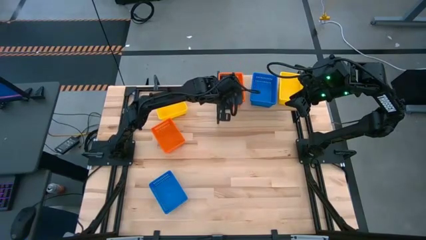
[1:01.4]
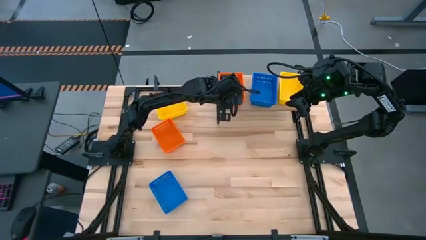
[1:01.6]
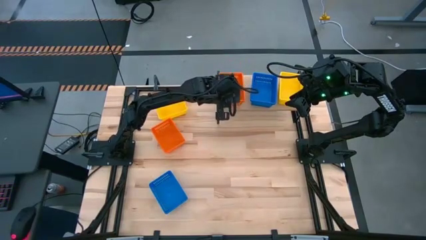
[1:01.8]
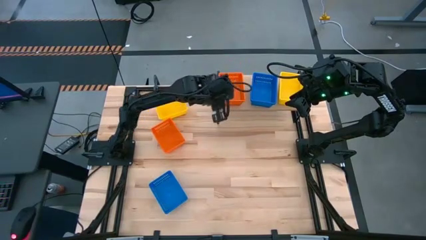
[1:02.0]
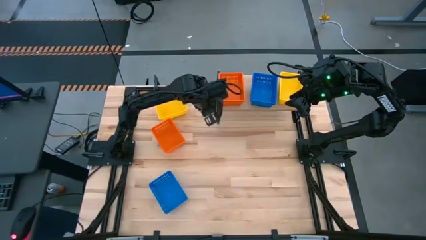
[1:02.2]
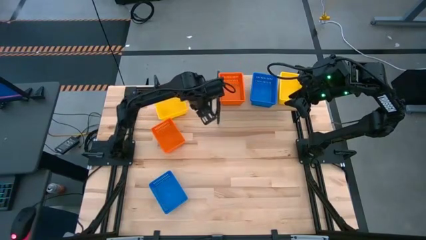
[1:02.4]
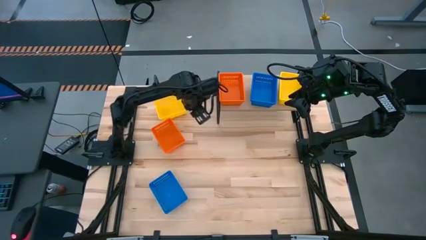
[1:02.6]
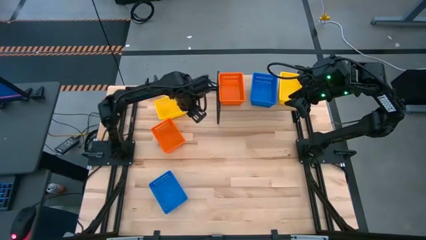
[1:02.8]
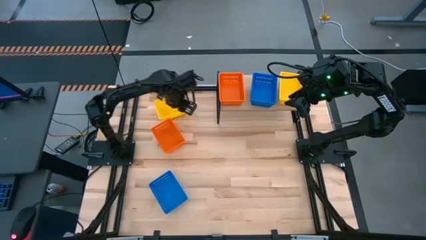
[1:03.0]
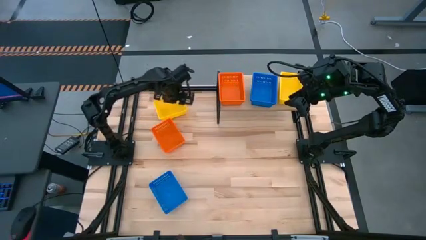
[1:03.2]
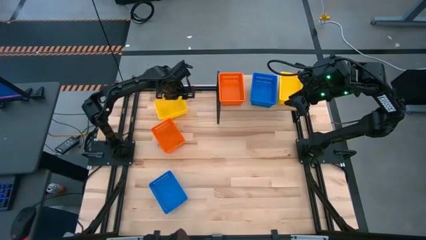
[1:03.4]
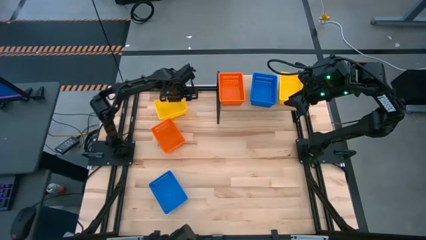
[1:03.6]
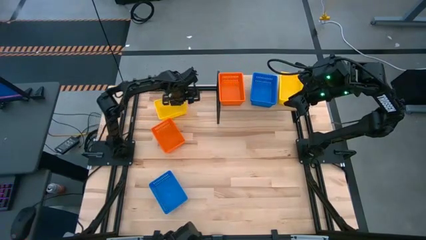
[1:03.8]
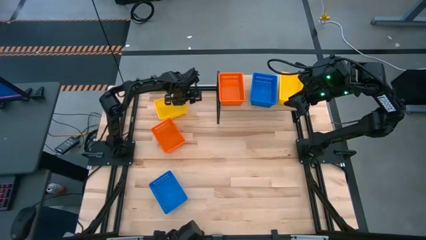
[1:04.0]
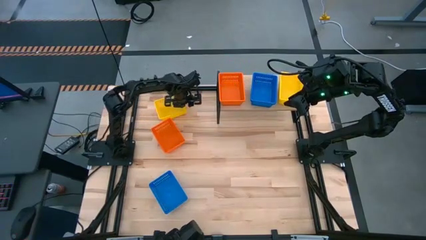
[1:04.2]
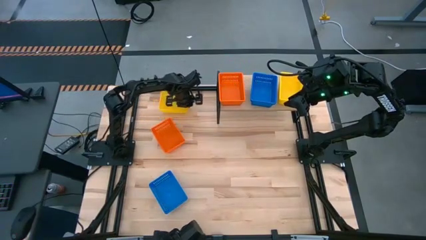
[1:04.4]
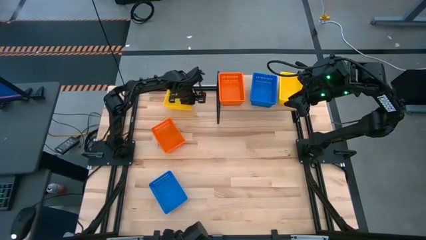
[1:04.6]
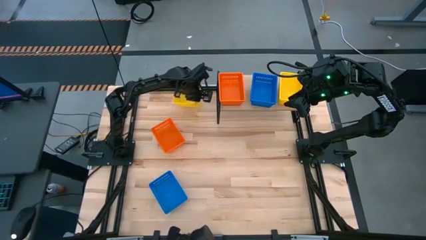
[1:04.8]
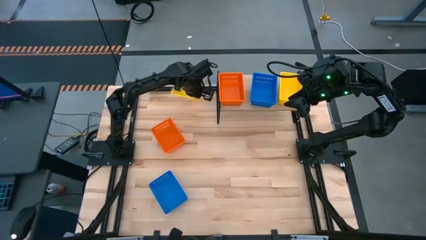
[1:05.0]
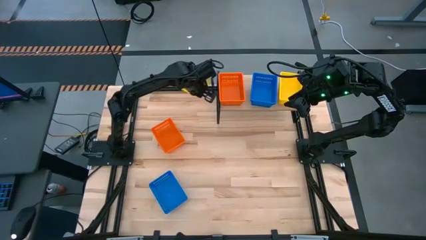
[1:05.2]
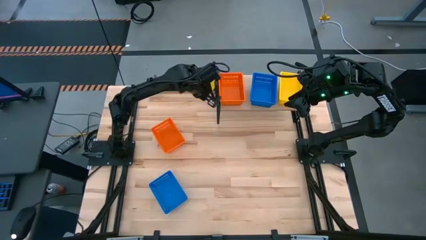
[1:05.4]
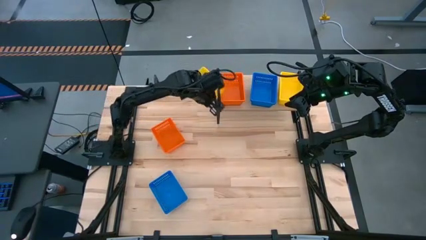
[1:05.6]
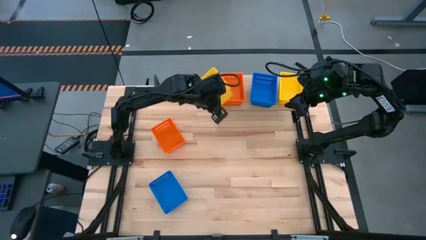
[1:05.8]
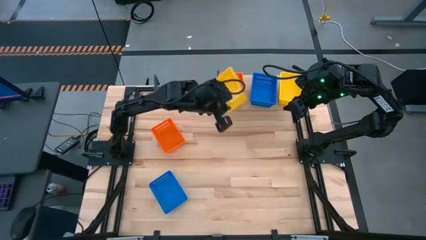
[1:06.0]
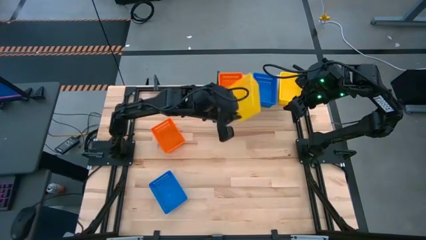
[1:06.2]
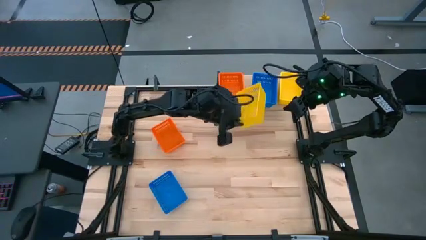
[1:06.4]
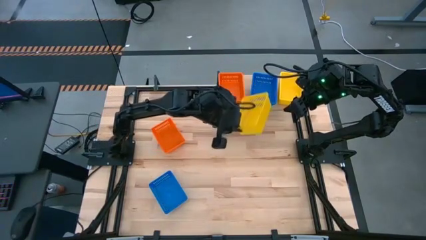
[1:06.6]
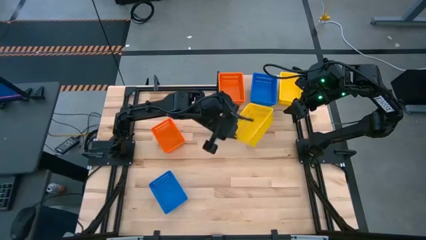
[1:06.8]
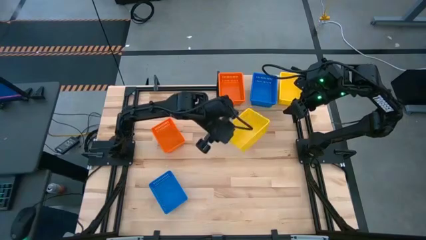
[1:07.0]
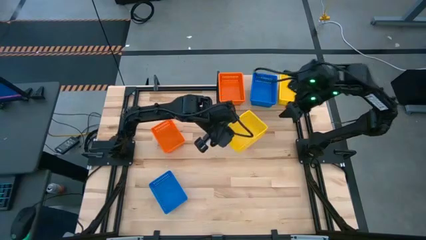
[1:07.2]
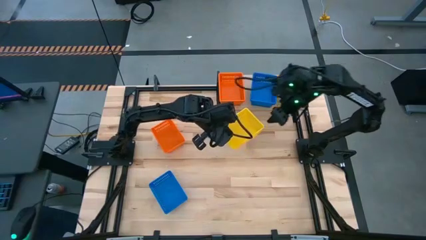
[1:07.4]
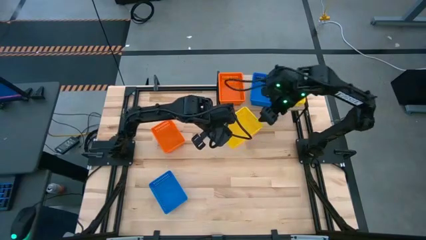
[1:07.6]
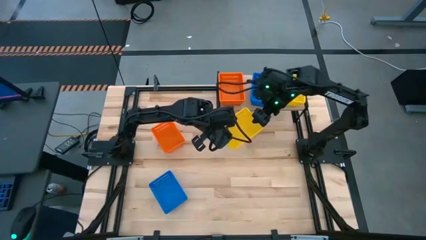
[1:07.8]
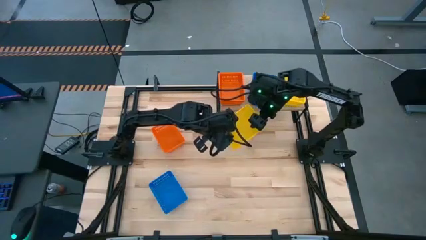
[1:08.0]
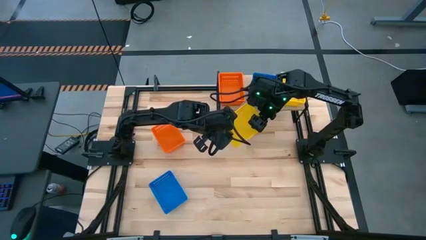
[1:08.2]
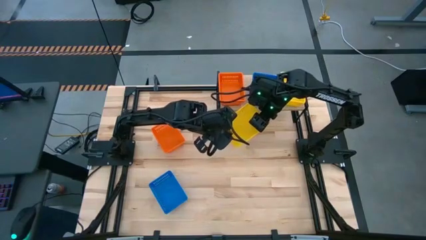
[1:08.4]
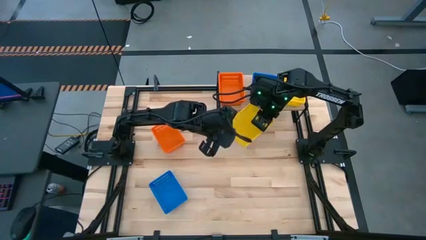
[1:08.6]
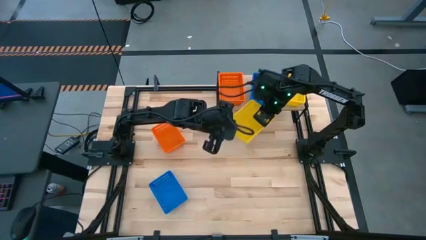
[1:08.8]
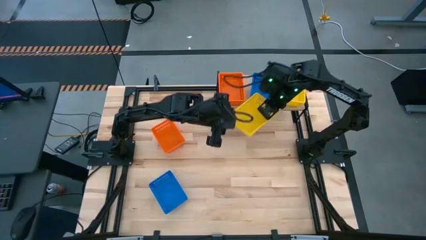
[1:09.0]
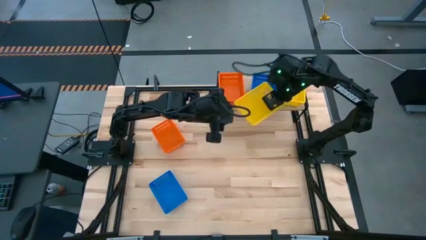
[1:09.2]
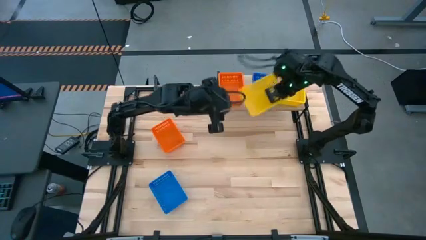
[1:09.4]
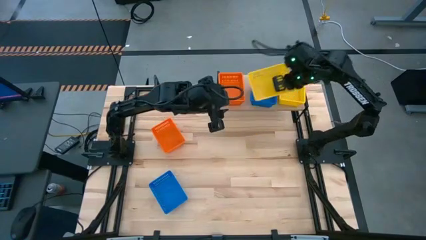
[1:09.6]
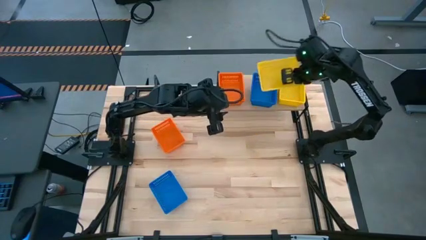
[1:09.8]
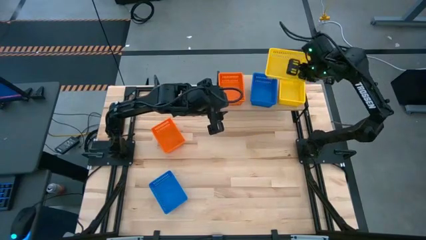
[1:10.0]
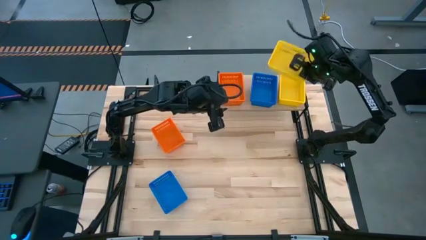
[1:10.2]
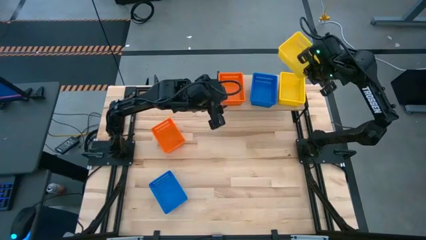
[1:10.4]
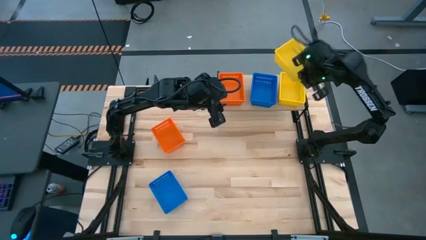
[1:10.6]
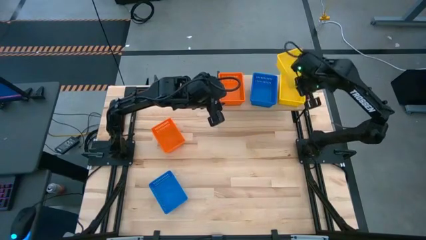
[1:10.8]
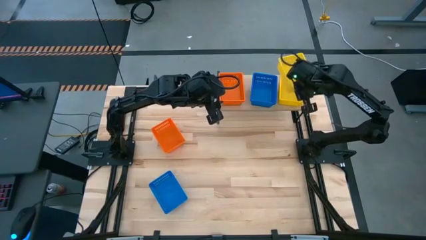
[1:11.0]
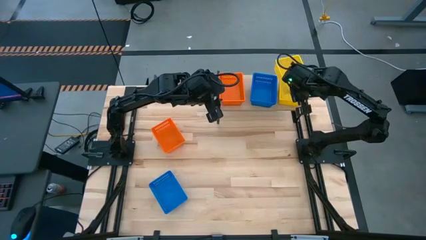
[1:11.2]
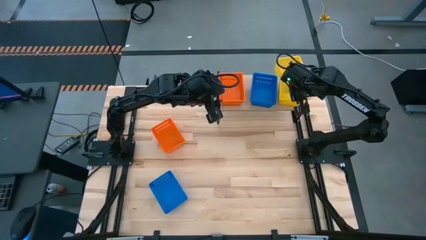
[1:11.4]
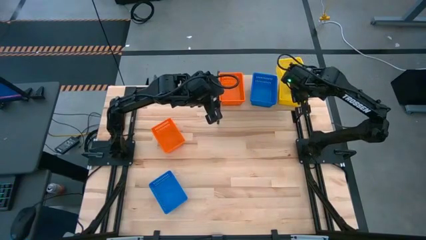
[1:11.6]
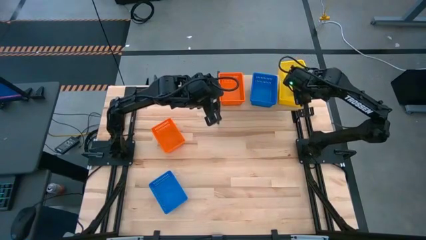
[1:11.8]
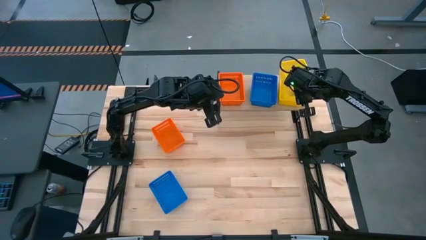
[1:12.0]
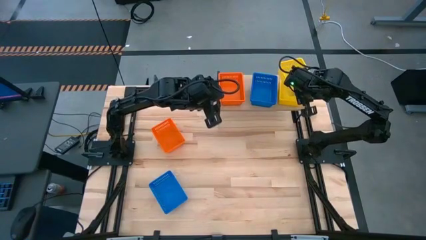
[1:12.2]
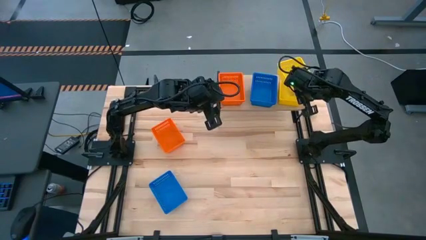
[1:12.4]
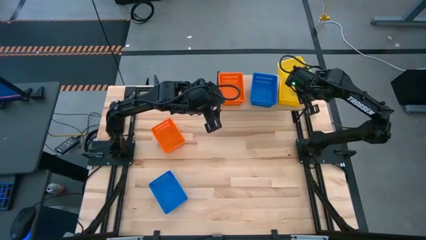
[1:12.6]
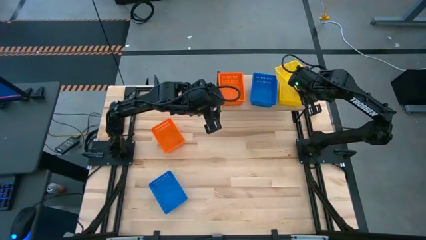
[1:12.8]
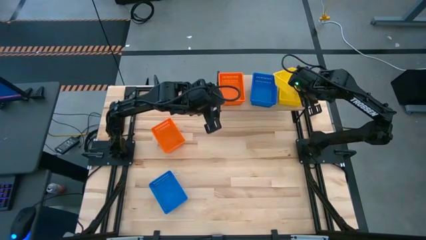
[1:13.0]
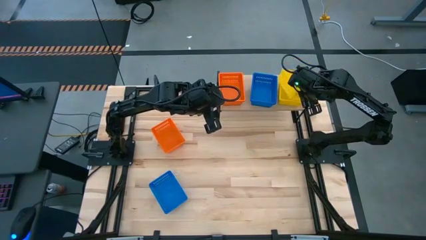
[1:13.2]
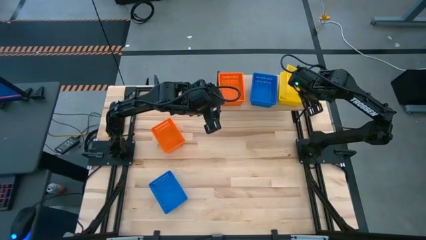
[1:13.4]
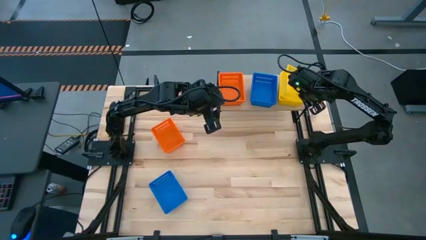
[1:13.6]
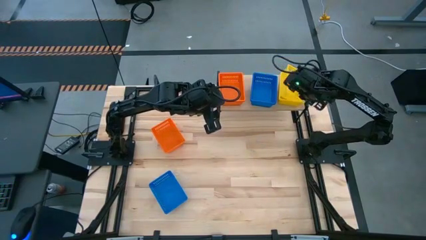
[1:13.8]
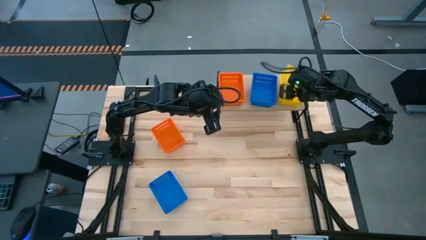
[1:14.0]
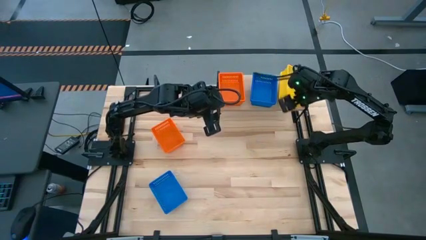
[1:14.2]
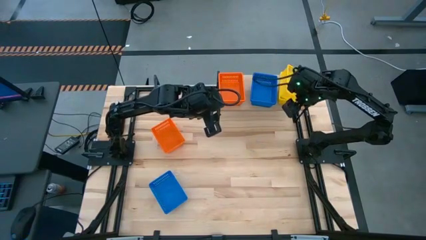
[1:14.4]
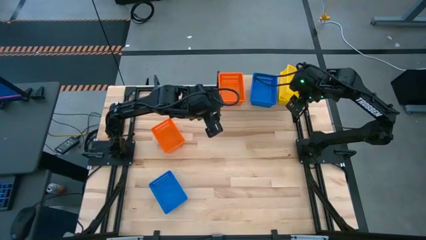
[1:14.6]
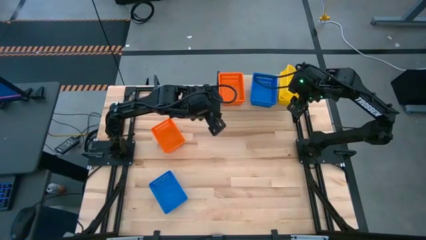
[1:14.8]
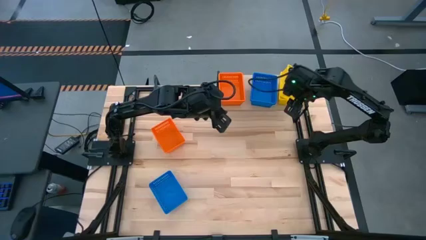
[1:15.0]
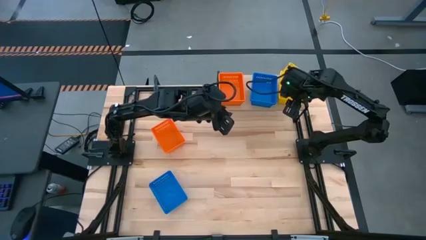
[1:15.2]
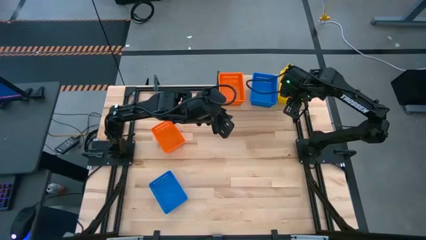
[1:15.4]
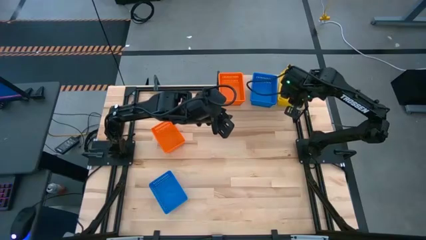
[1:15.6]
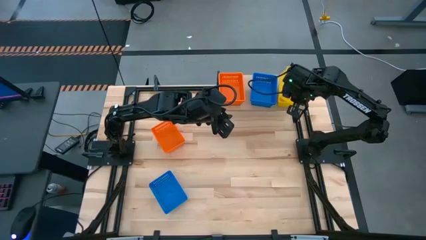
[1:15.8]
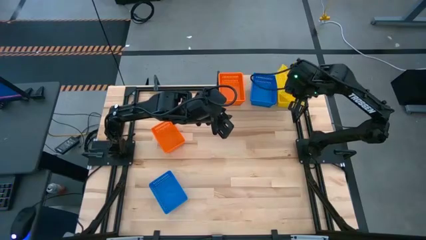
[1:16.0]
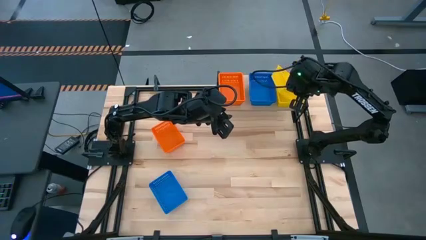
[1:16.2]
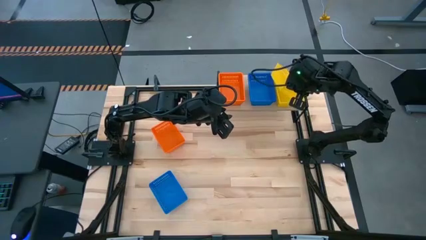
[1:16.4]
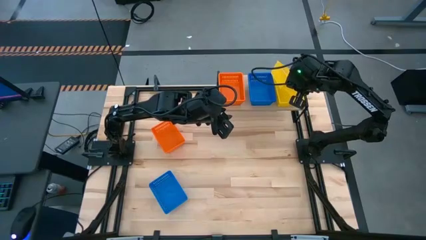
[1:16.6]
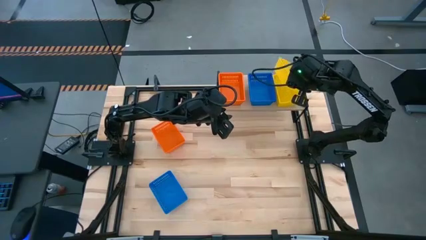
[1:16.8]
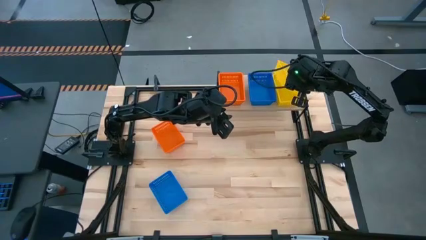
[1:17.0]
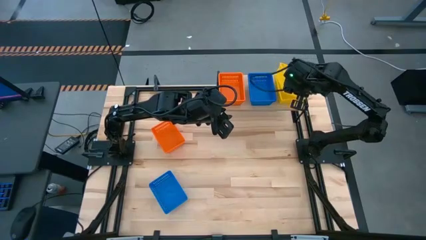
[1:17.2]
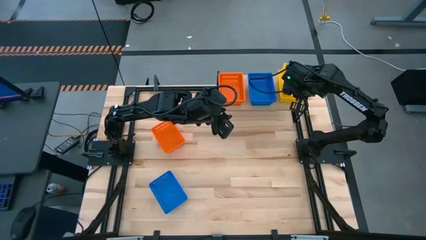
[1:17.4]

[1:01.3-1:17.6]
Task: Stack baskets on shelf by color
Stack the yellow basket on top of the yellow basket on the shelf
